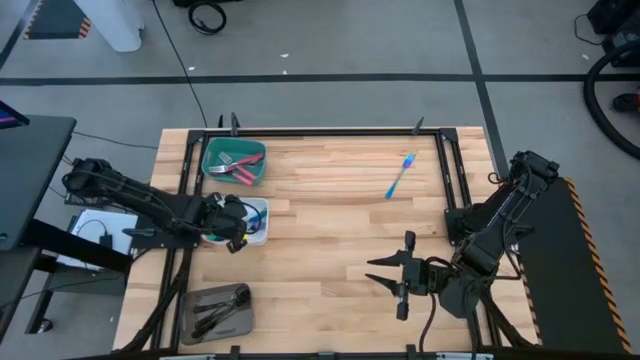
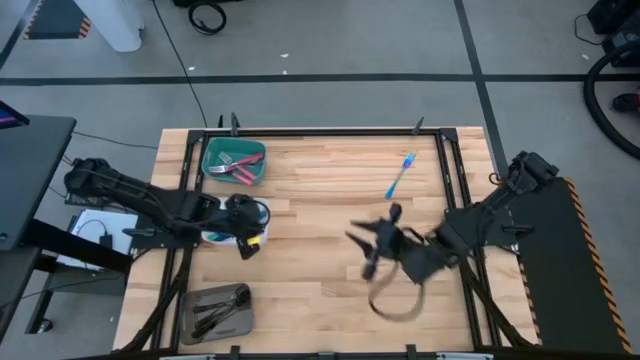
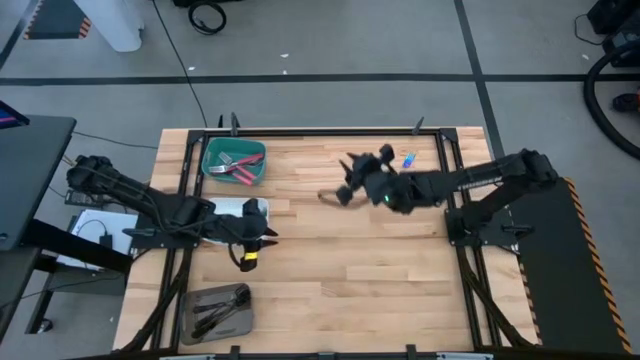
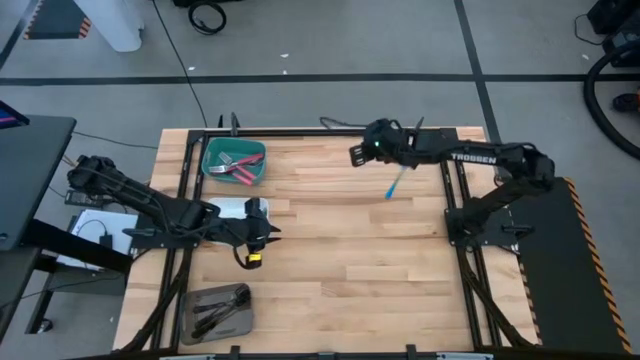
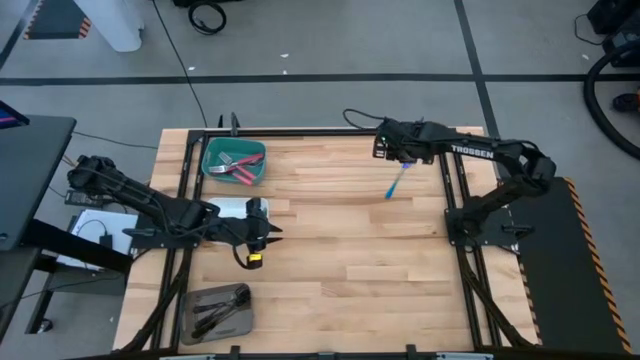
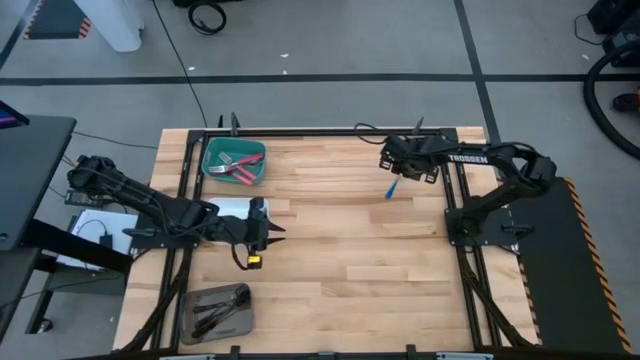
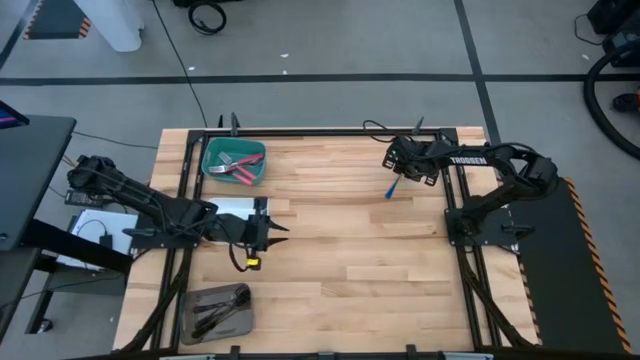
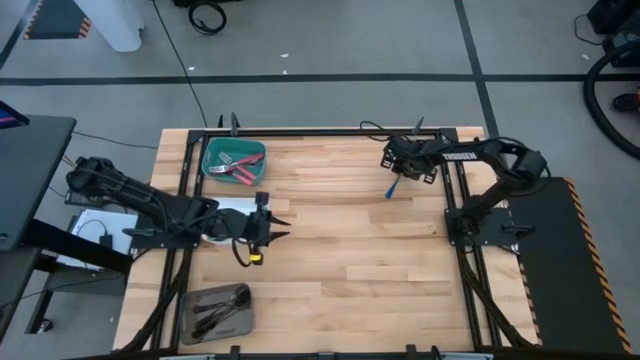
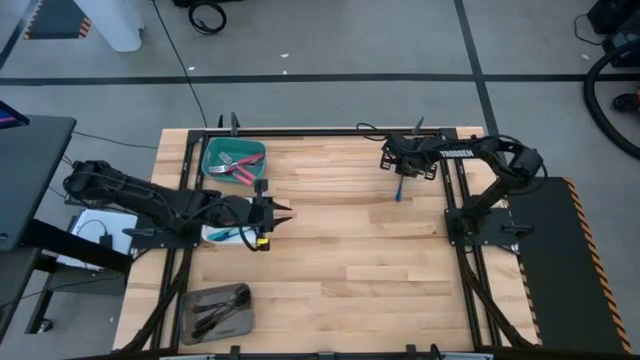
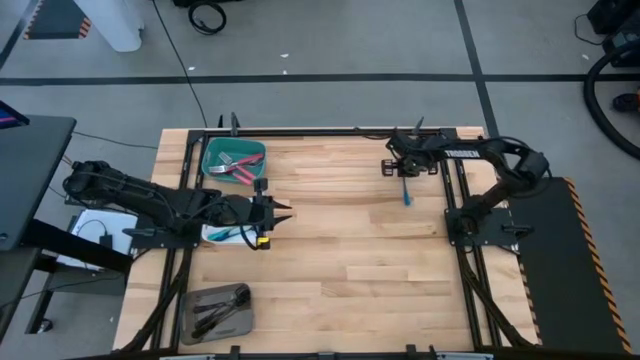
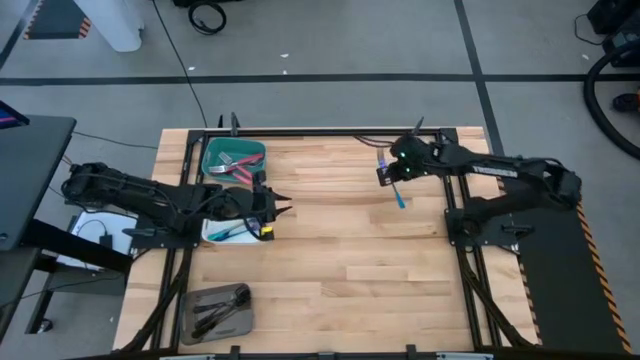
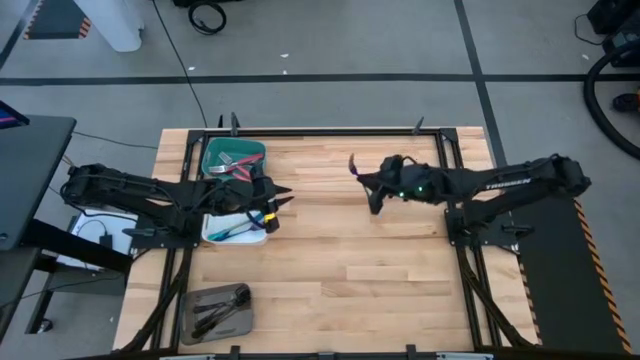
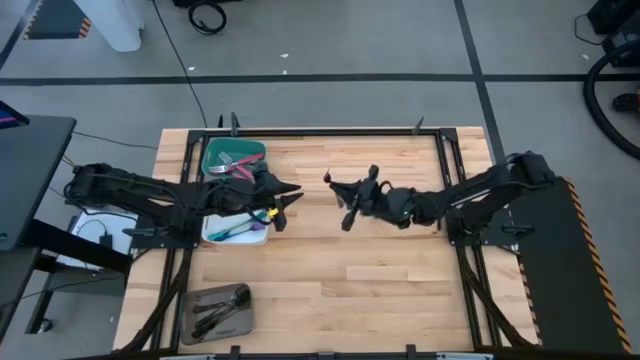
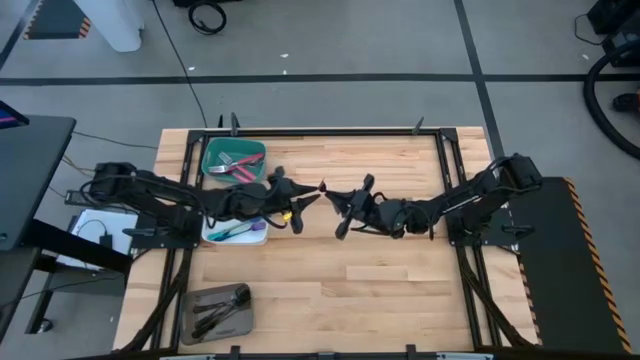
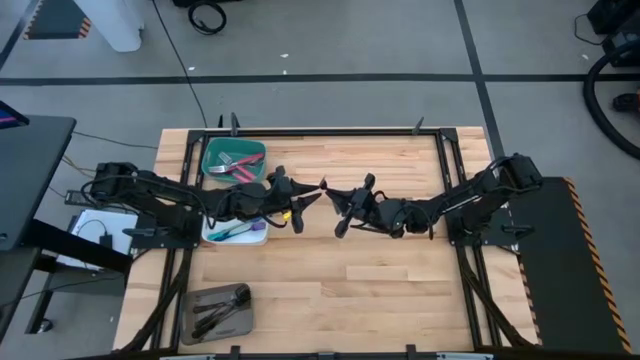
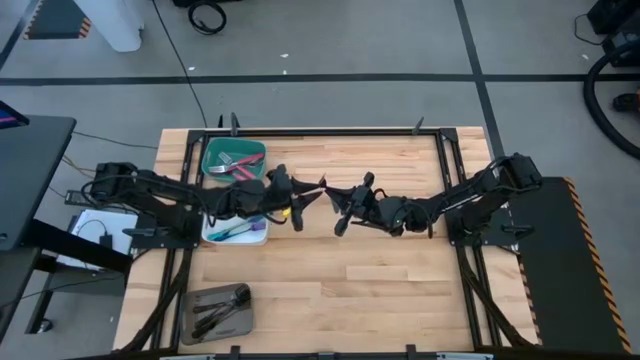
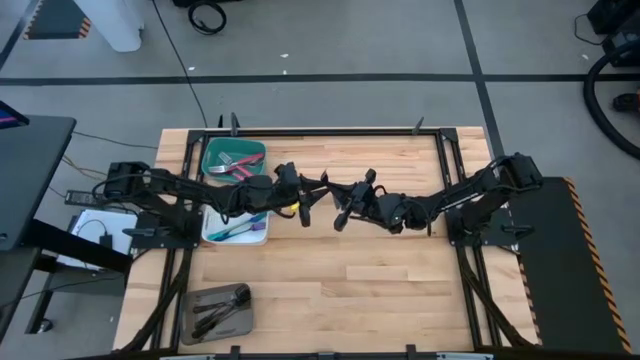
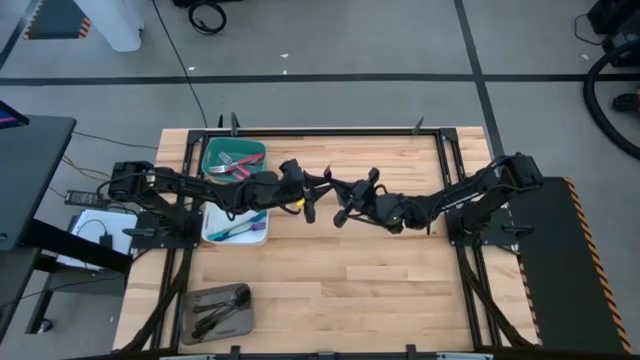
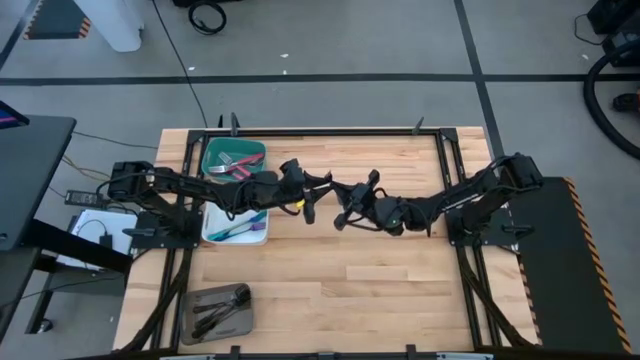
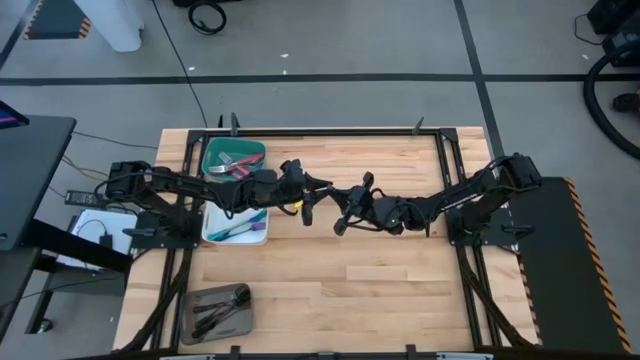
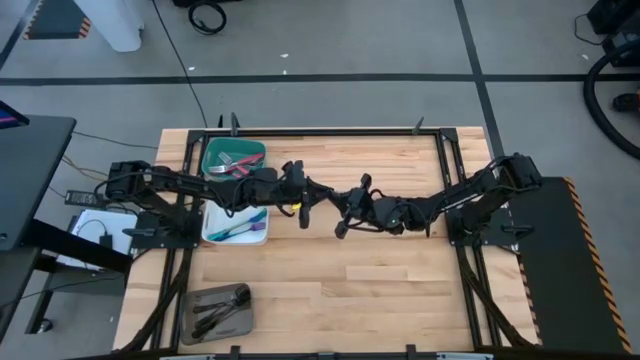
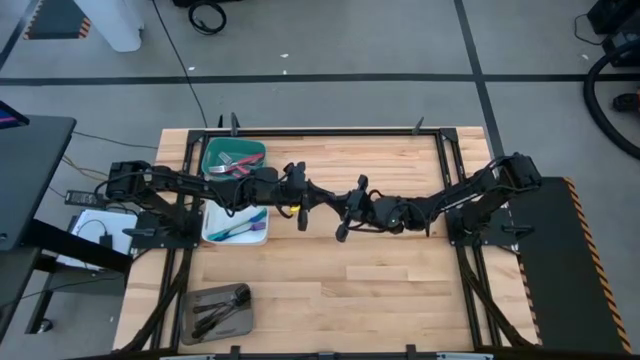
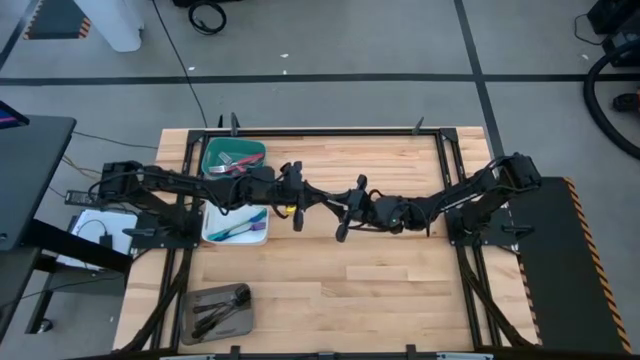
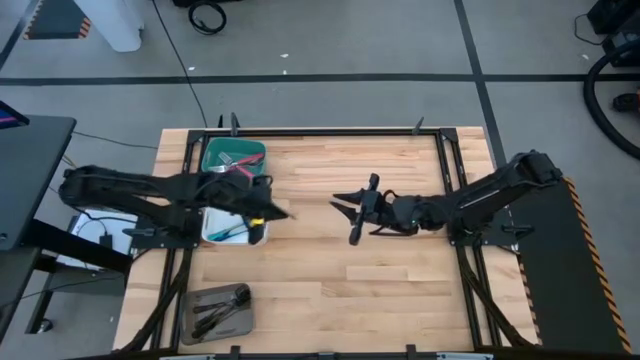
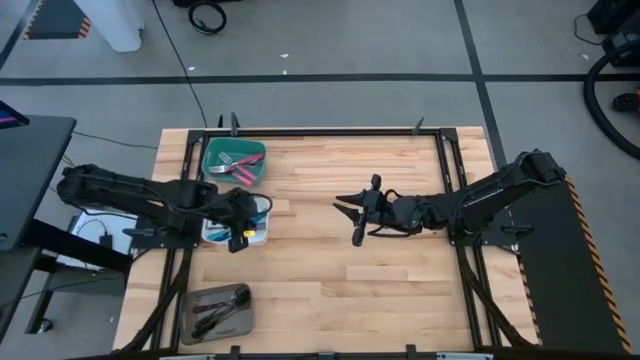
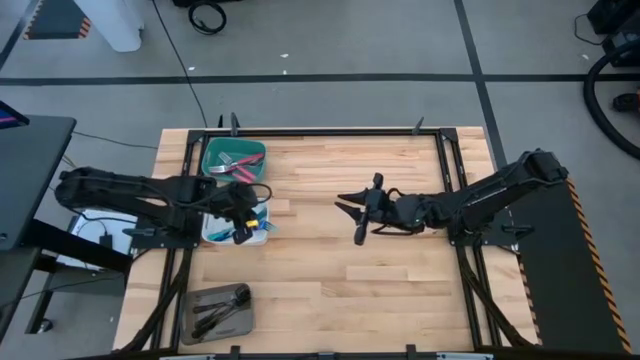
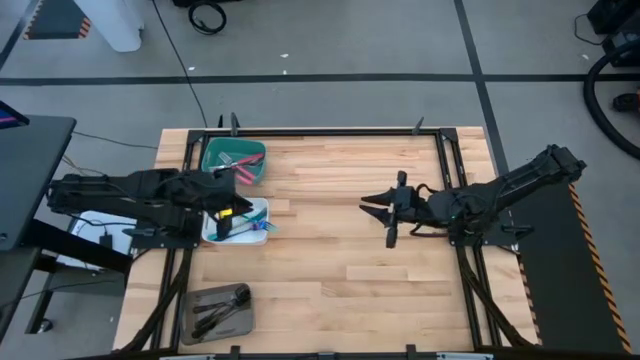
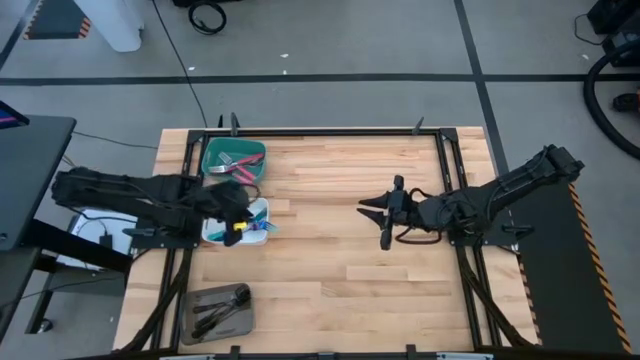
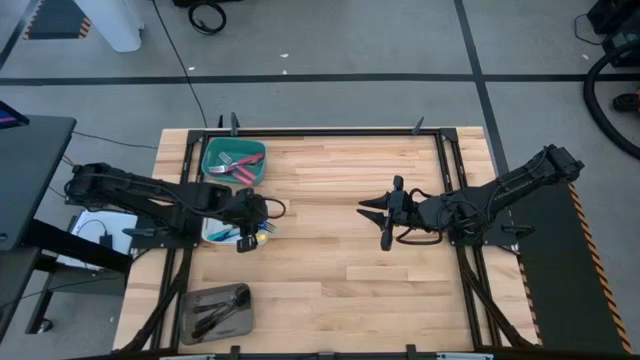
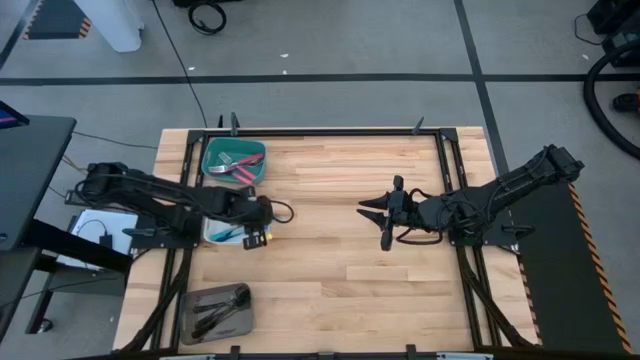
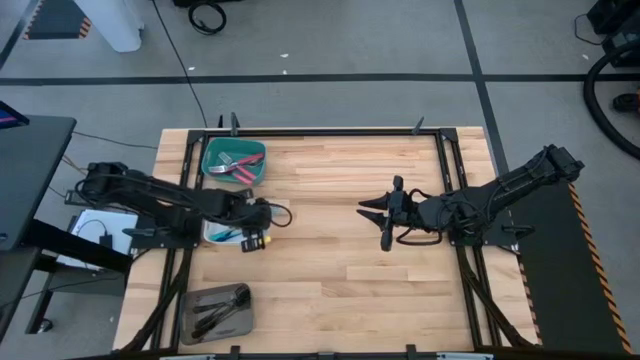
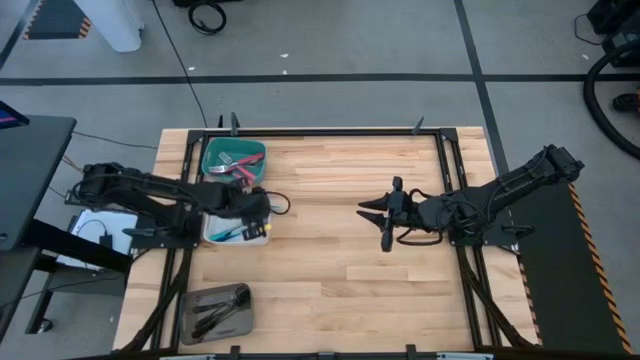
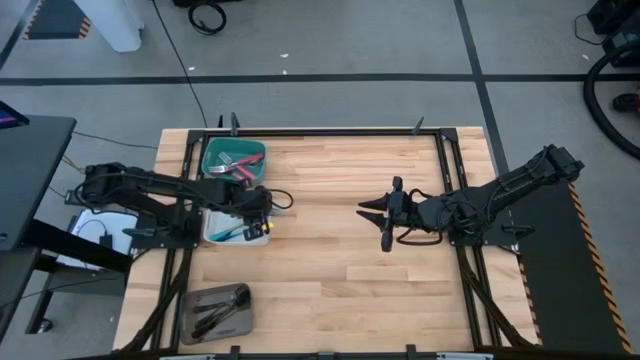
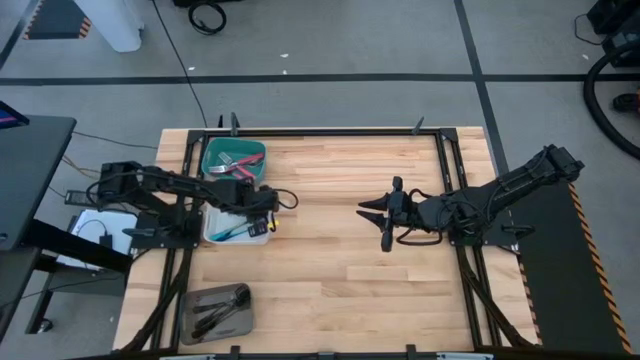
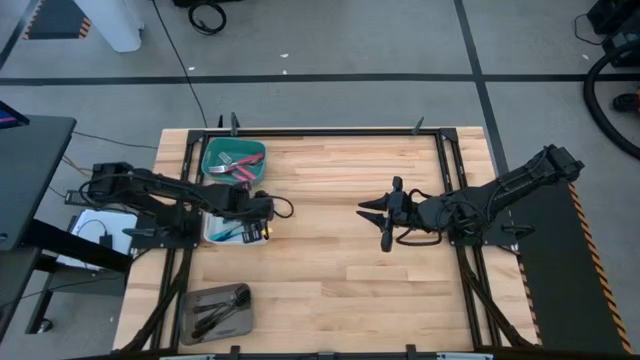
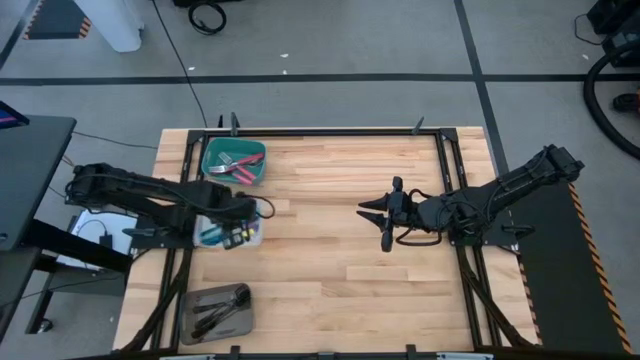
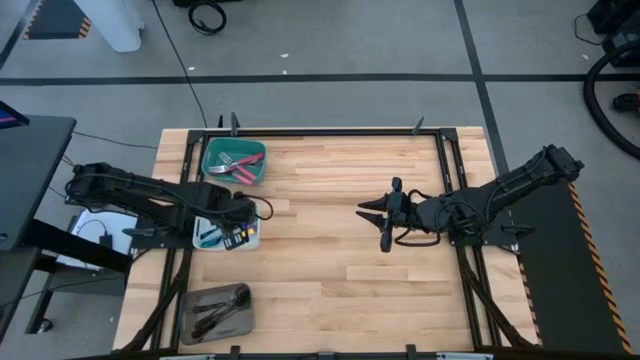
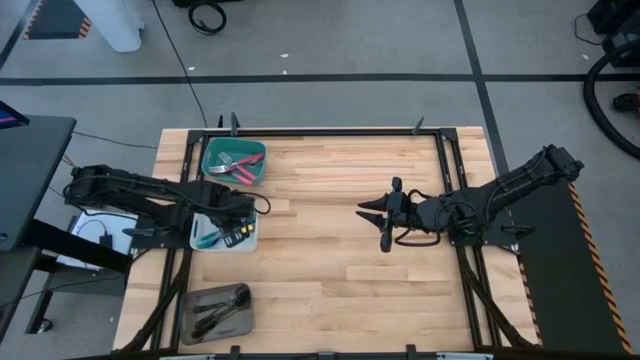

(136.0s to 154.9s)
Task: Sort silverware by color (type)
Put the blue fork into the white bin

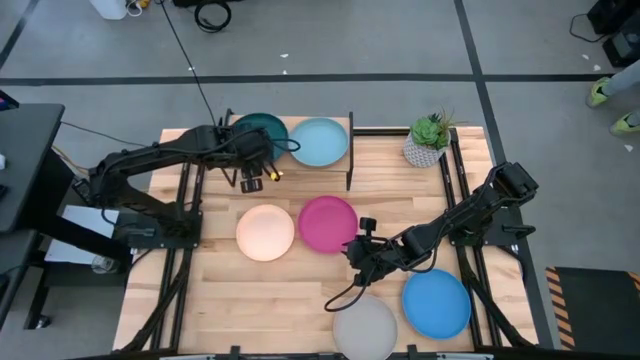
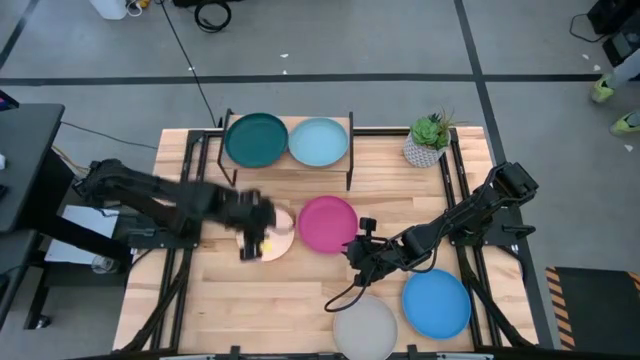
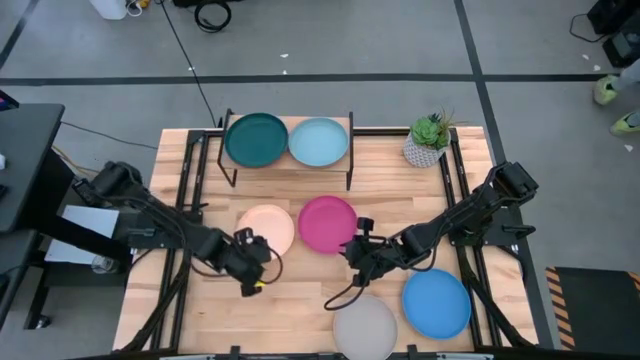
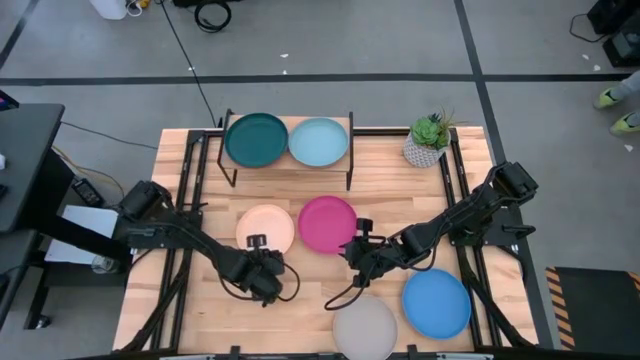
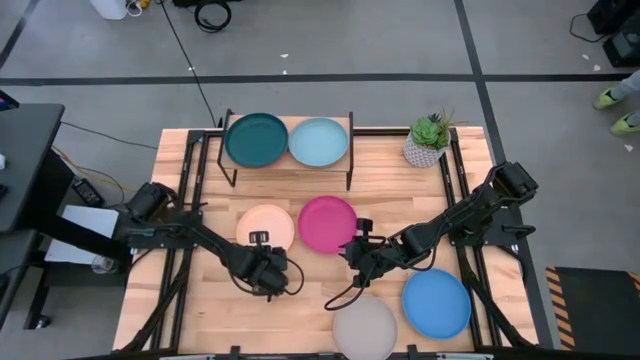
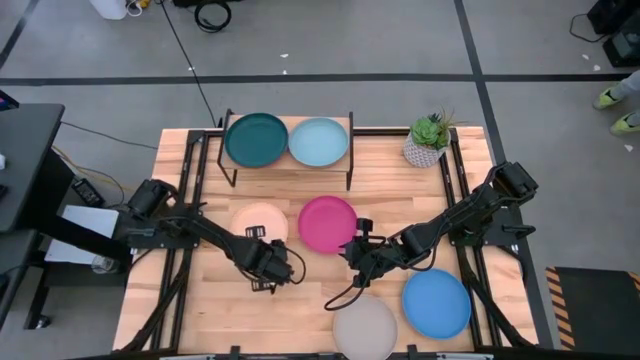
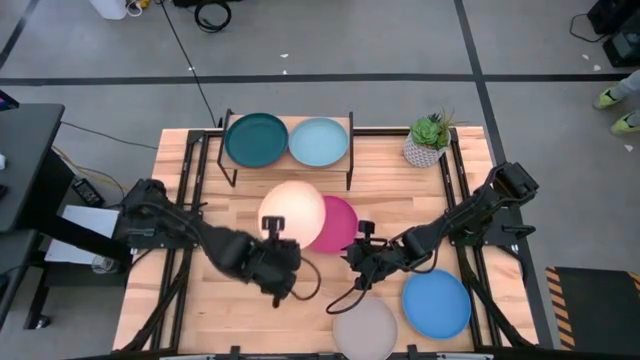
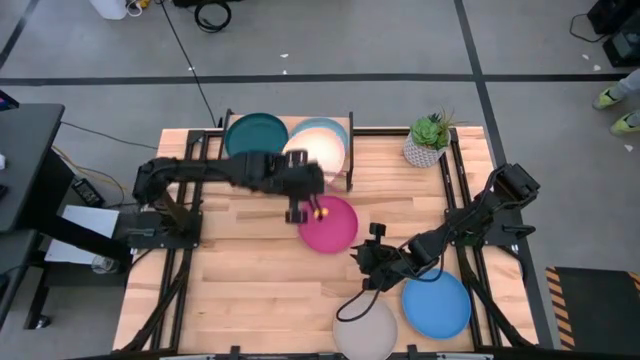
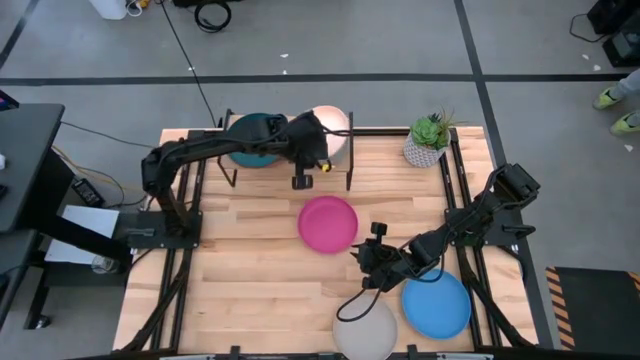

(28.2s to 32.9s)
Task: Place and stack plates onto a shelf
Stack the light orange plate on top of the light blue plate on the shelf
